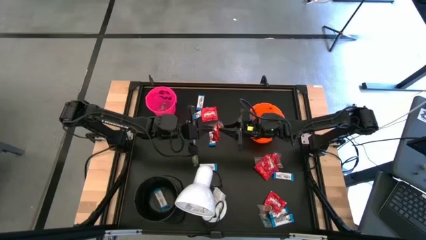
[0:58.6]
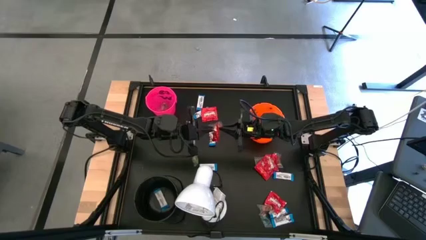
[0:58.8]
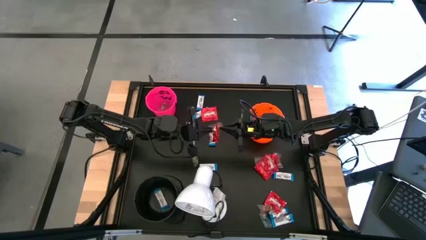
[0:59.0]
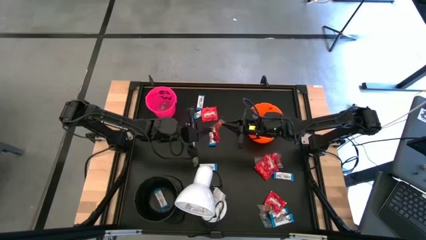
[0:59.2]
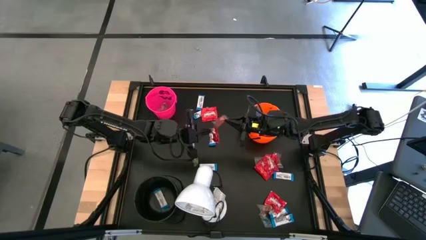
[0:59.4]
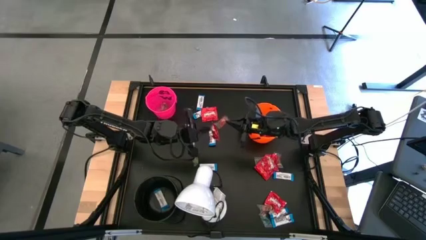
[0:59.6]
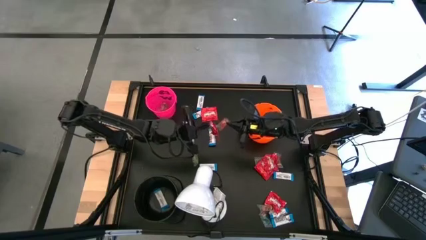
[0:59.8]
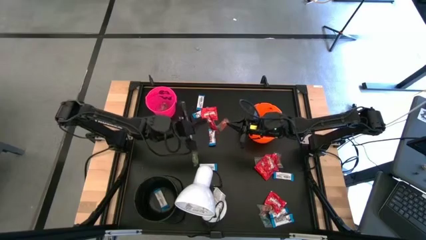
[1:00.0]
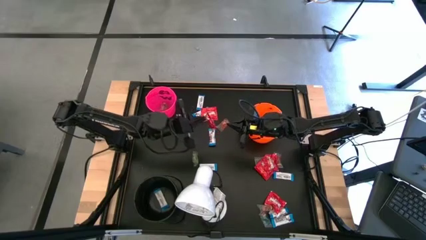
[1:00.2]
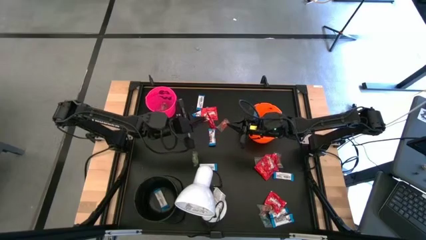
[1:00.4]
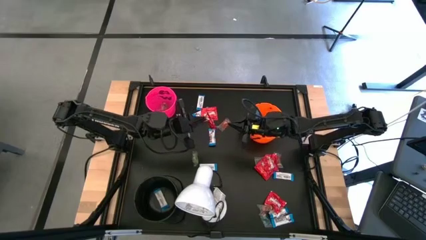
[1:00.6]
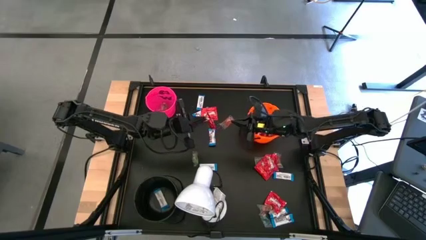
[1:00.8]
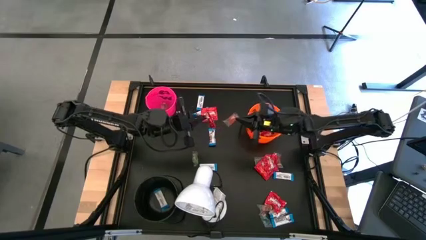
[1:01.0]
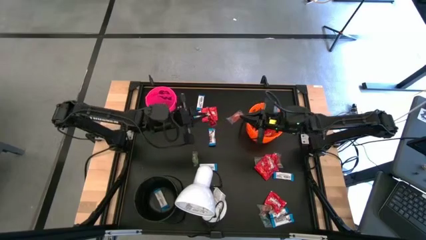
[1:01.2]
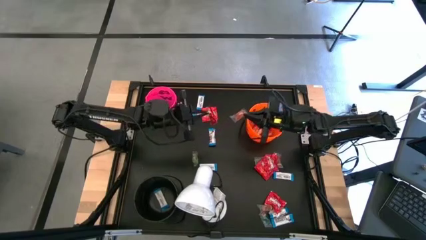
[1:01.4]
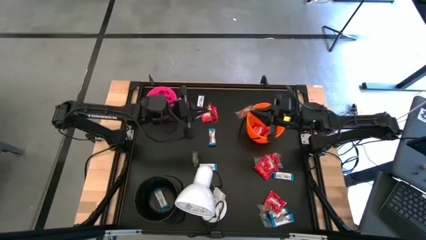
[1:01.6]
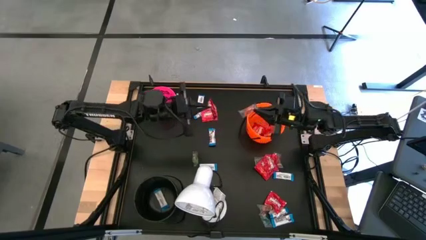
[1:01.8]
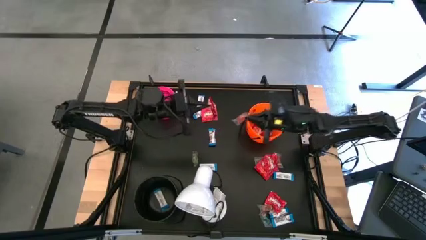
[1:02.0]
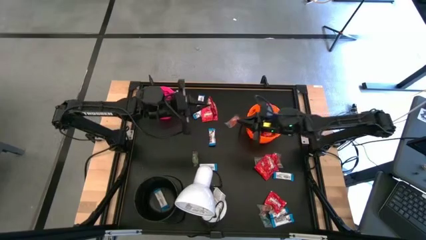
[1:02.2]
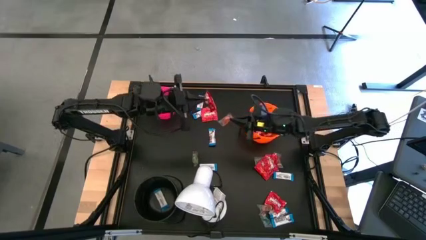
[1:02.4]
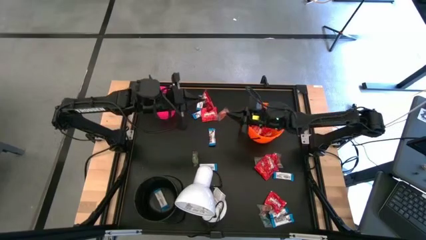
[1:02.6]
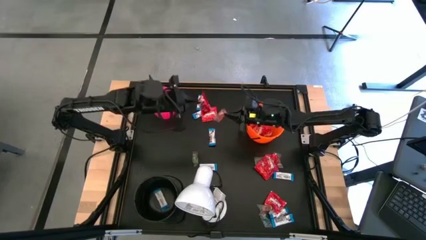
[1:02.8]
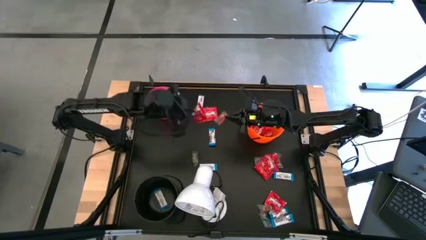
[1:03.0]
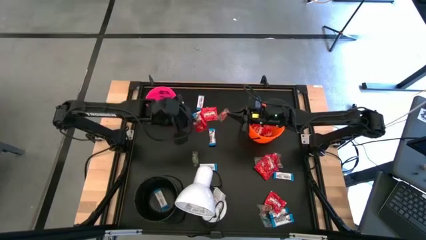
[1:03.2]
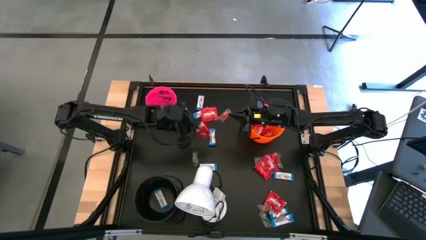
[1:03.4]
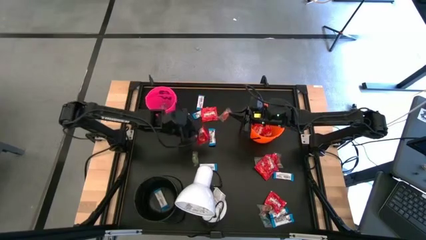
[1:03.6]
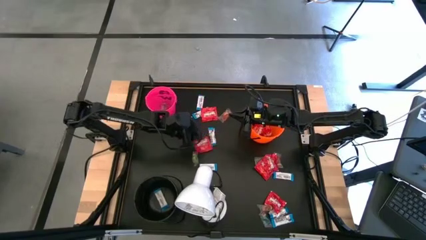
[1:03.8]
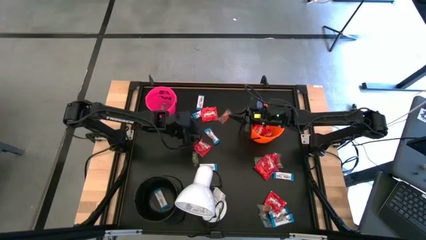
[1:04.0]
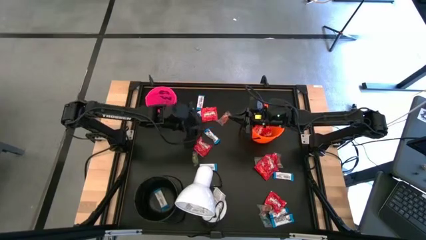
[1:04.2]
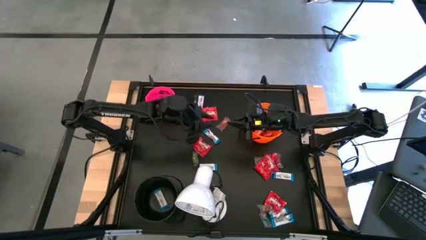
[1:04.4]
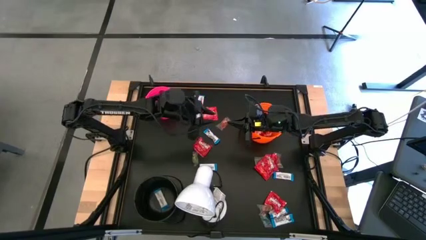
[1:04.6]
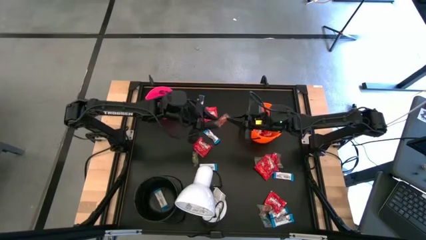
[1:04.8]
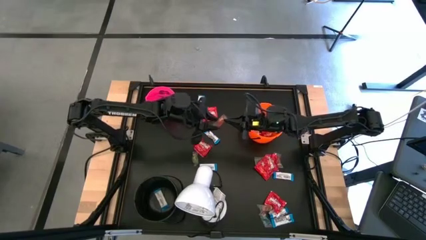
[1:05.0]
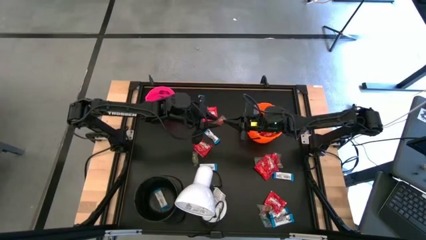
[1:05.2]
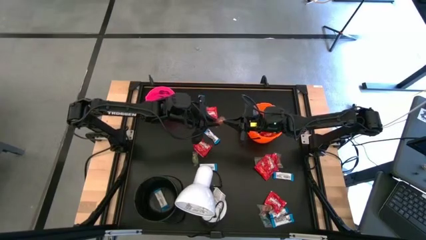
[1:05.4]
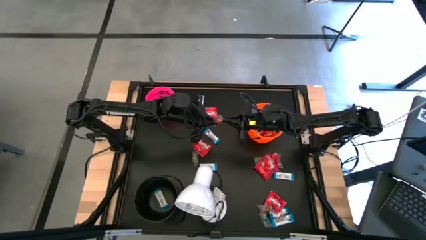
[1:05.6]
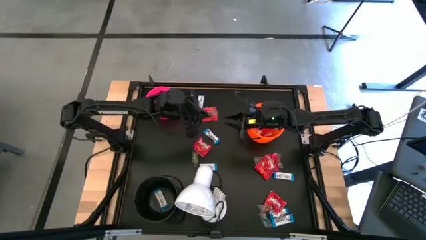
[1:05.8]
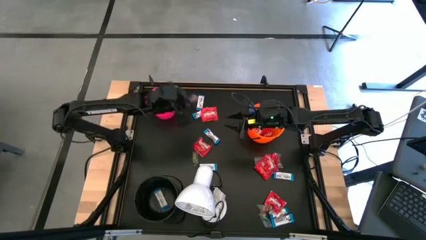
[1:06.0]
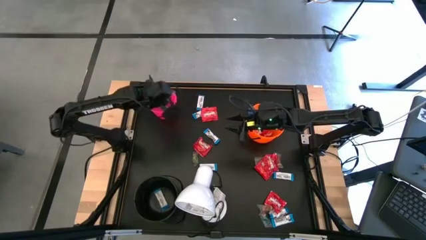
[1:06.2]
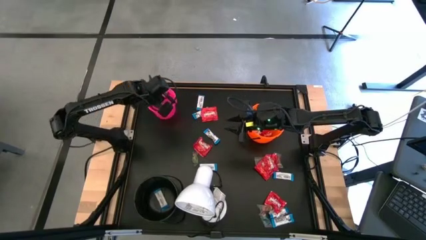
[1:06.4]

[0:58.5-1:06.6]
Task: Sort candy
Put the orange gummy into the pink bucket

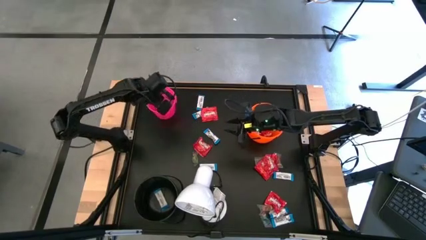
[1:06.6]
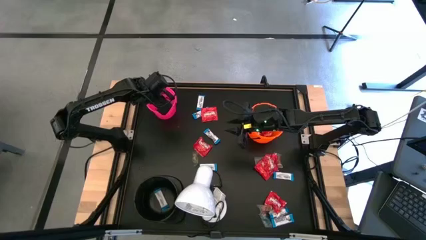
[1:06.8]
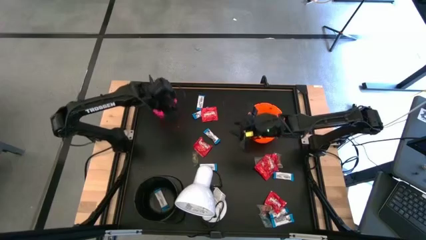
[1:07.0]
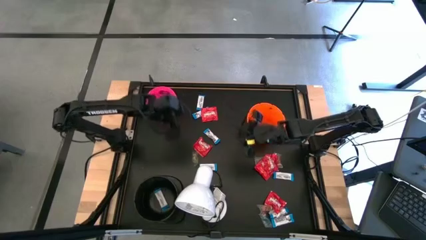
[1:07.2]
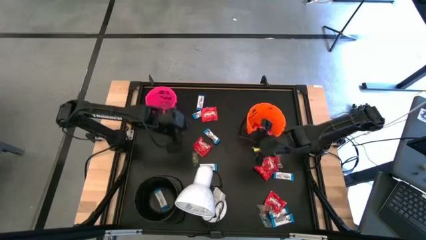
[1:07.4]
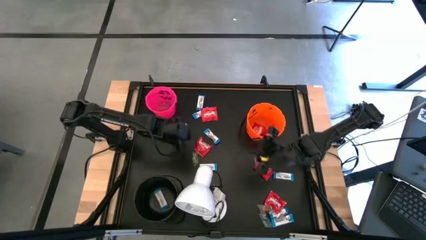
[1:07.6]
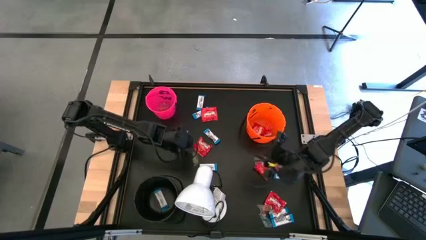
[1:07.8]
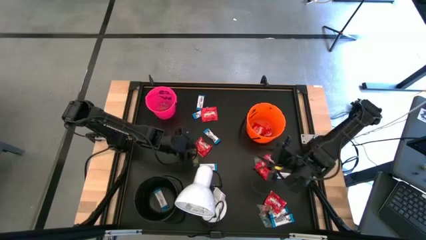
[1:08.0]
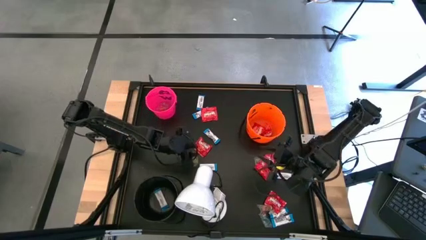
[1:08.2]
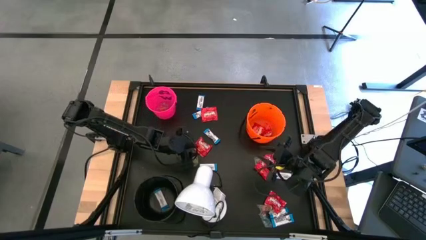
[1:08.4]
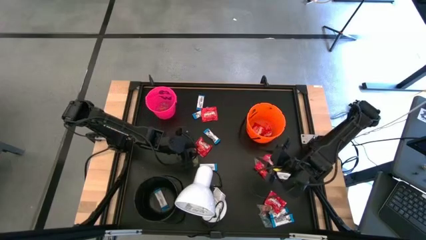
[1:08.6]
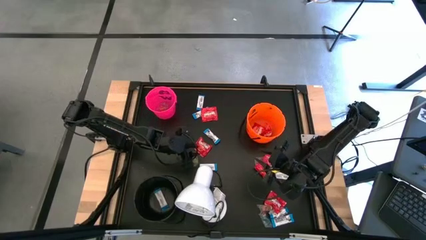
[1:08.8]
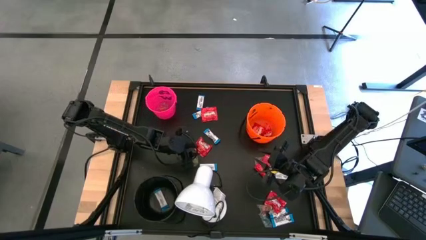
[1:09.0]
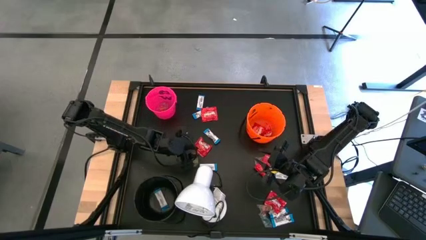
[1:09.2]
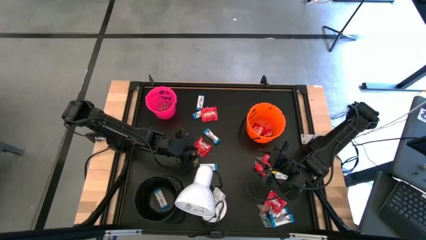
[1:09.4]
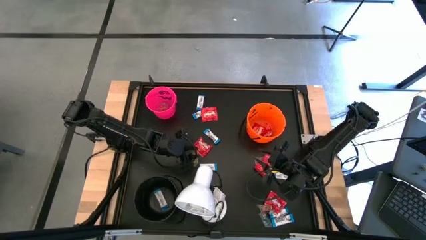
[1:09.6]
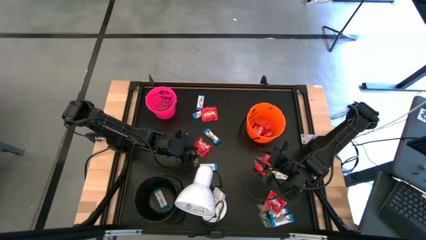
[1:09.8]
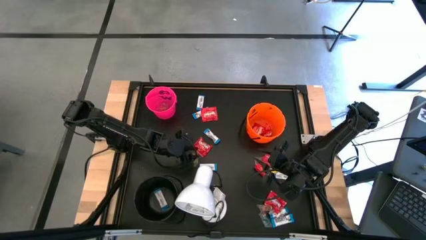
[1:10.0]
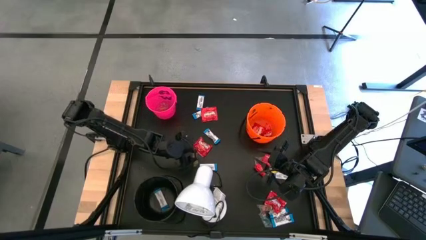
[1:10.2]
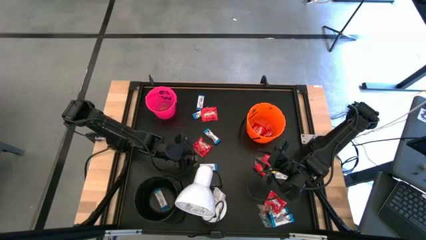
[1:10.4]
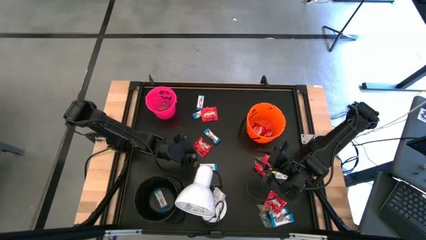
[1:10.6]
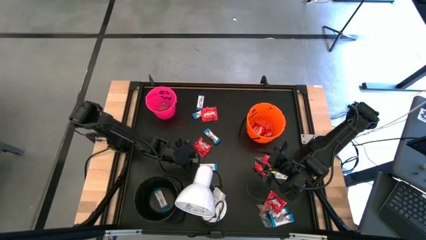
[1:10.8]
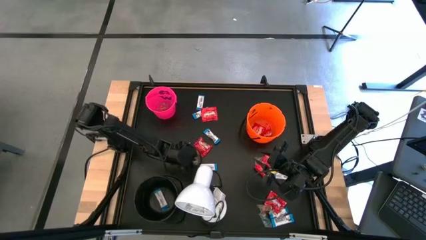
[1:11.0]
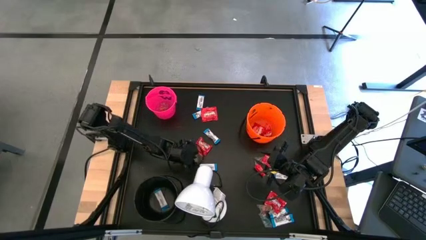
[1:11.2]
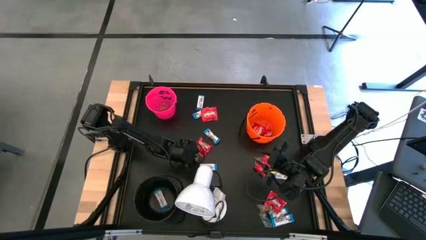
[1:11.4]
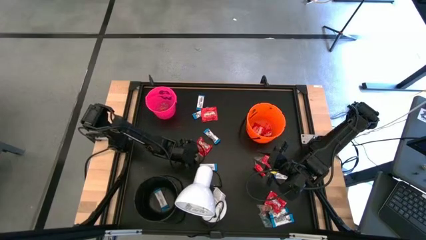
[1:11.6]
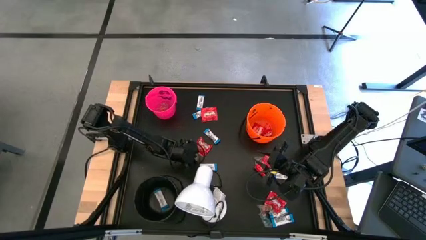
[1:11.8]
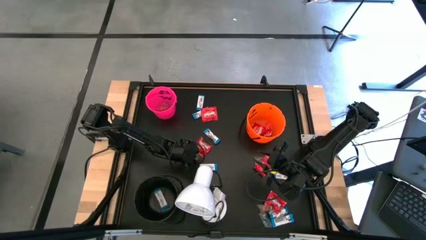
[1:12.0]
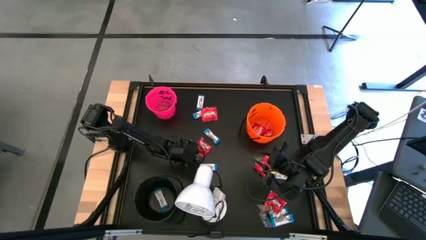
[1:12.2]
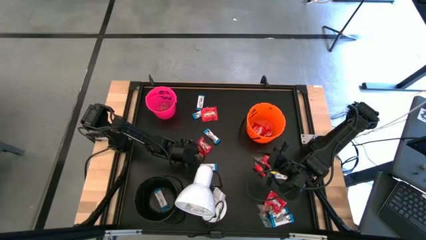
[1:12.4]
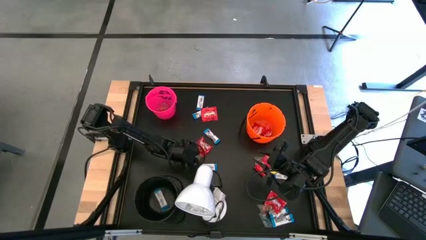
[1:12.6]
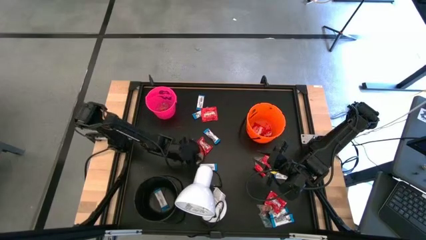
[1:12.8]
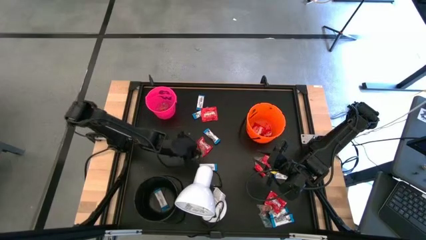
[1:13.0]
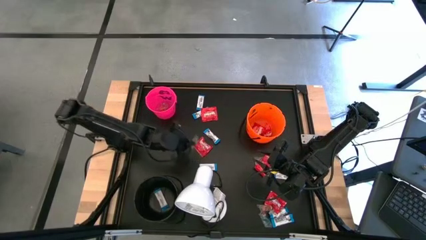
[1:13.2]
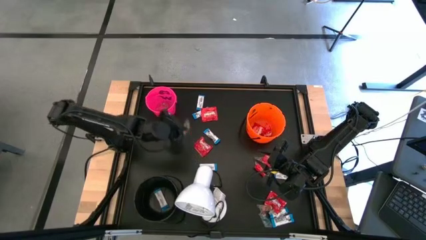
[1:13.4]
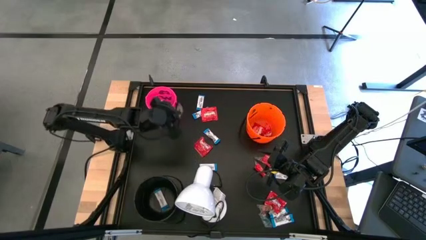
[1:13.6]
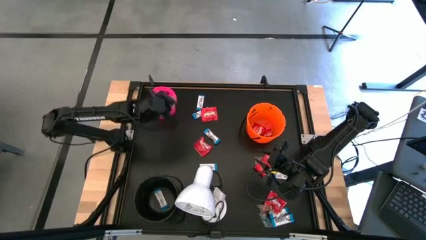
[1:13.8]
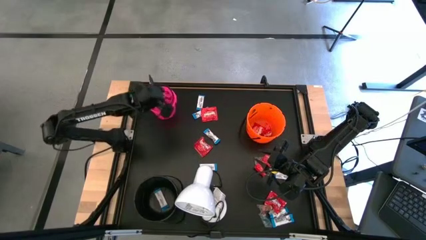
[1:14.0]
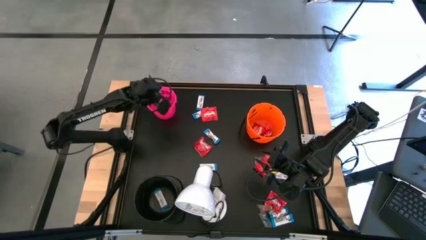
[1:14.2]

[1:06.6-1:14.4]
Put the green gummy into the pink bucket
